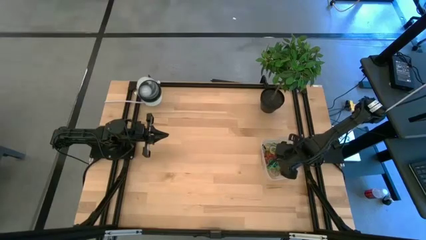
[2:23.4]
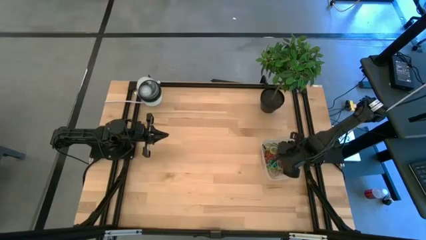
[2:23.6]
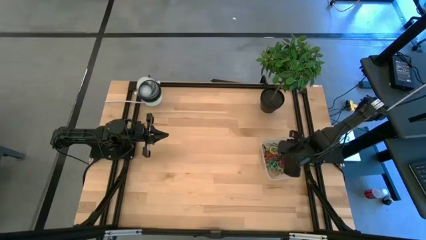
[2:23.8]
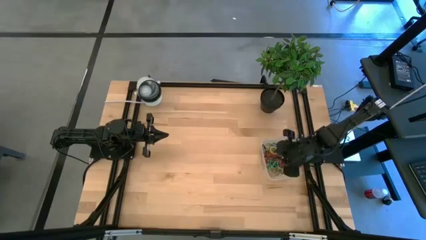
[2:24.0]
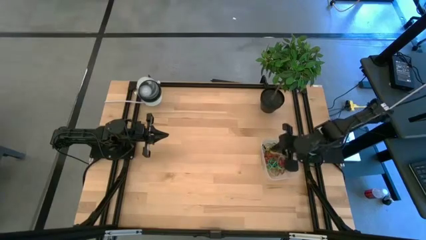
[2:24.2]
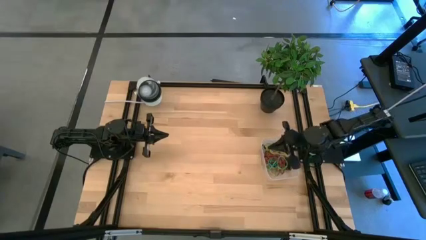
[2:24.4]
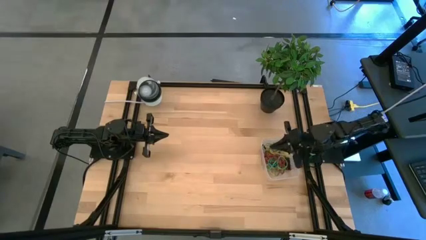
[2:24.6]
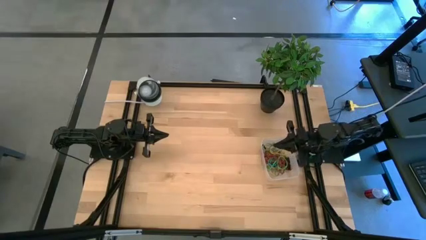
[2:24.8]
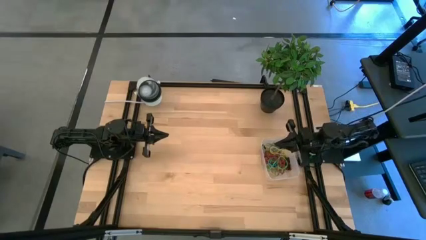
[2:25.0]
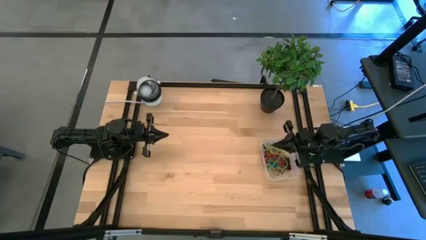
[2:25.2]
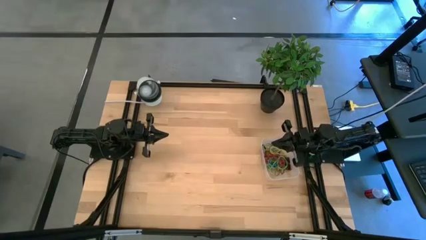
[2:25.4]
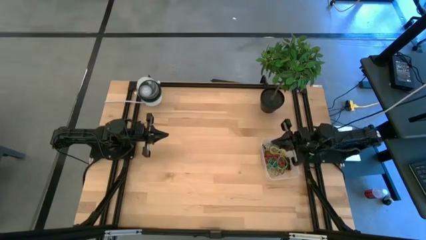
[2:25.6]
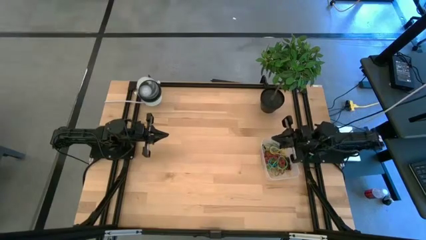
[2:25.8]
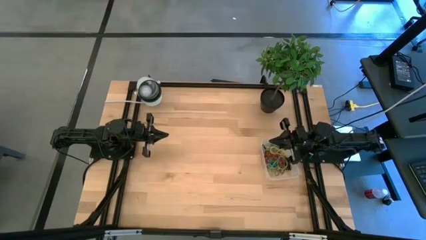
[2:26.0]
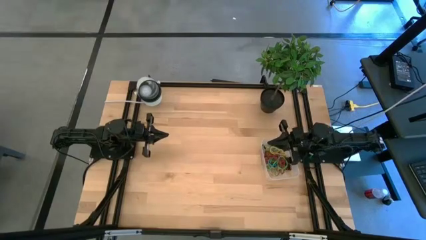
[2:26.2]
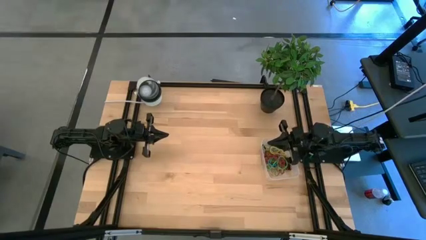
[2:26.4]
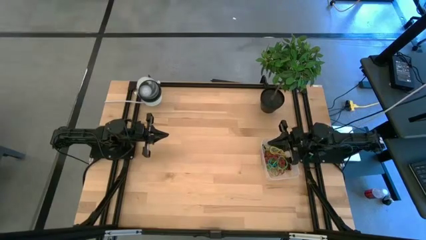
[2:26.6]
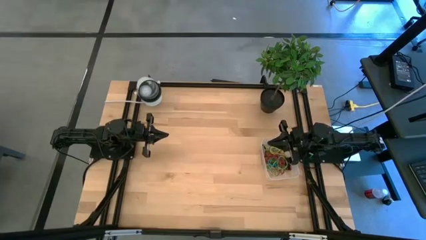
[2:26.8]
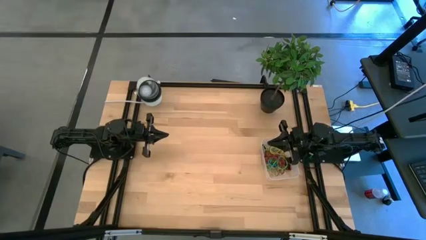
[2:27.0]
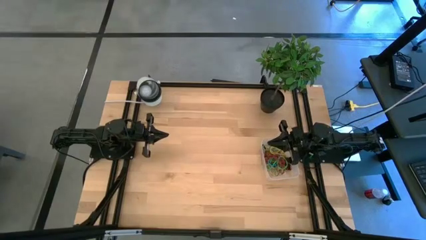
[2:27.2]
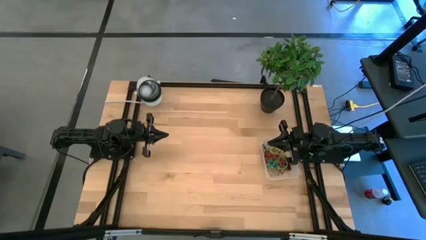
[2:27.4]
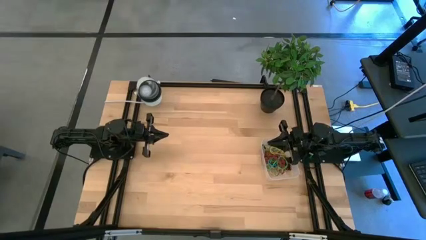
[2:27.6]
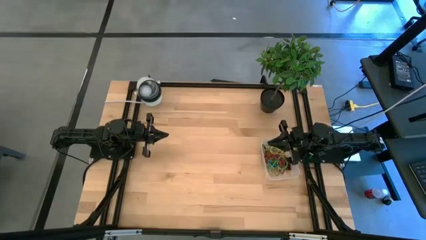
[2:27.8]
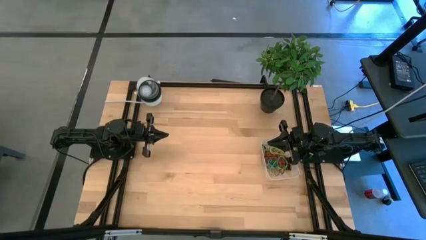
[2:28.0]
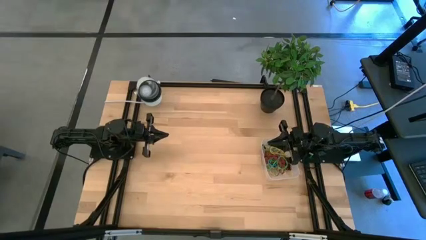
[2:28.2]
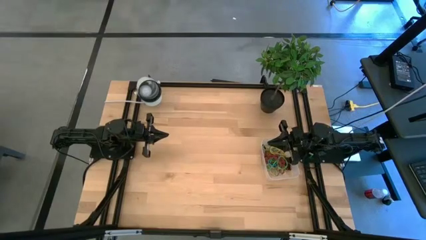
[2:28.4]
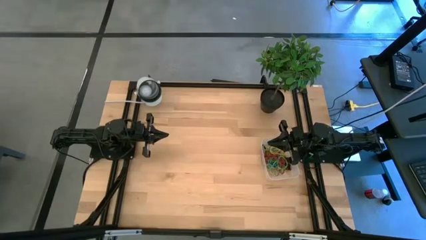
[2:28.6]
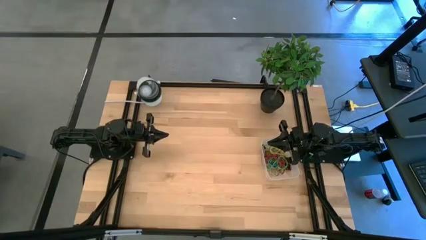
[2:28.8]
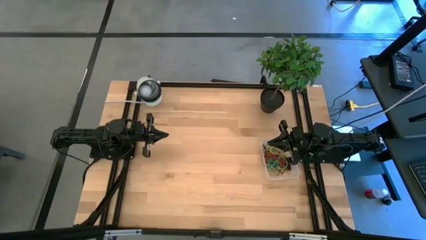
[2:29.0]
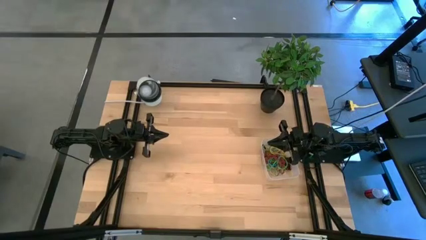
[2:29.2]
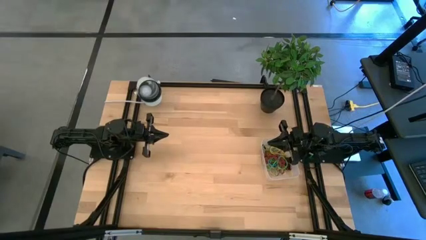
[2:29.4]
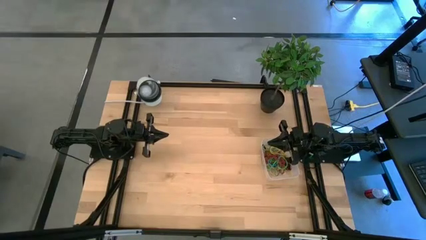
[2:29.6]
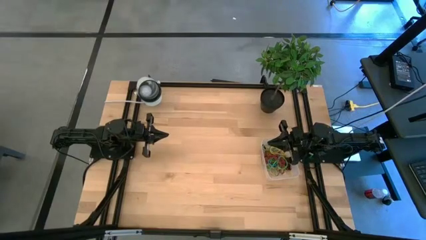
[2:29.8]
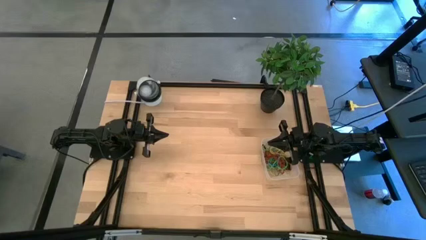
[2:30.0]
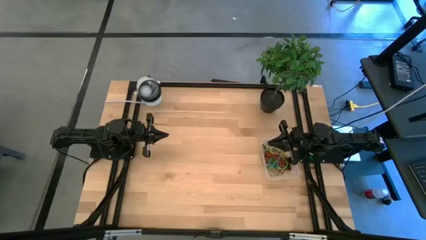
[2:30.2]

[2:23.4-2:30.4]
Task: Pick and place rubber bands into bin
Return to Home Position

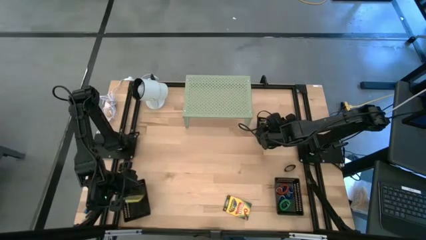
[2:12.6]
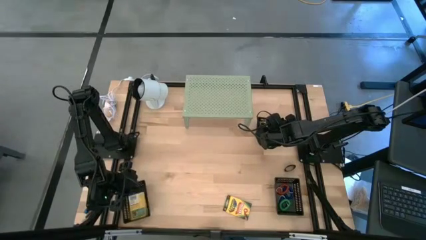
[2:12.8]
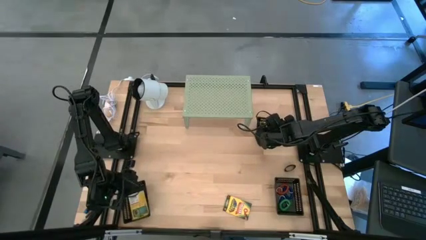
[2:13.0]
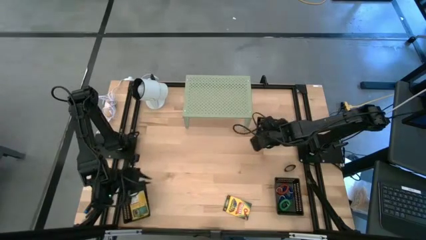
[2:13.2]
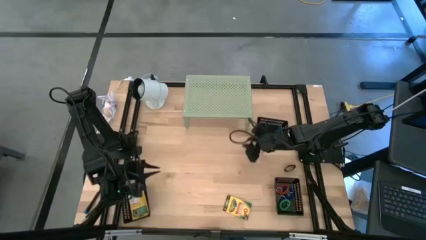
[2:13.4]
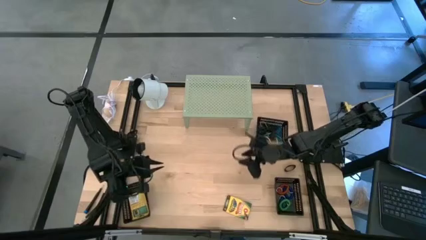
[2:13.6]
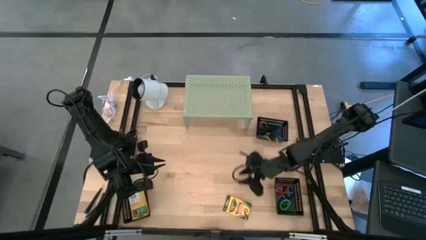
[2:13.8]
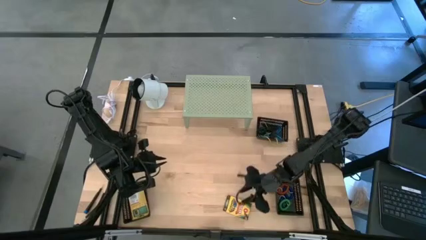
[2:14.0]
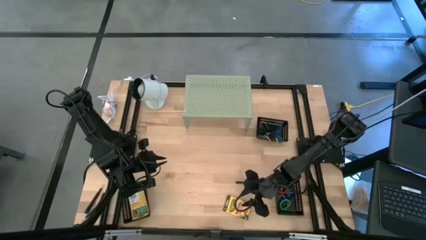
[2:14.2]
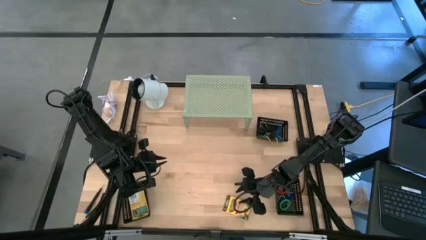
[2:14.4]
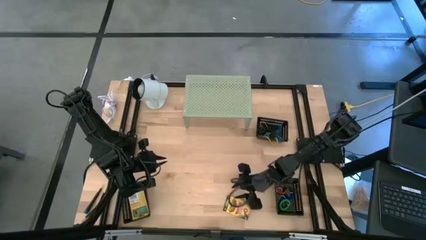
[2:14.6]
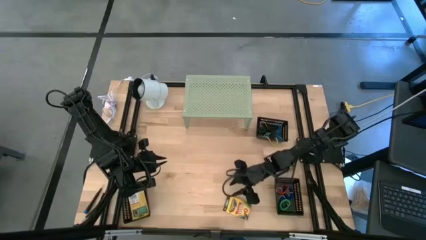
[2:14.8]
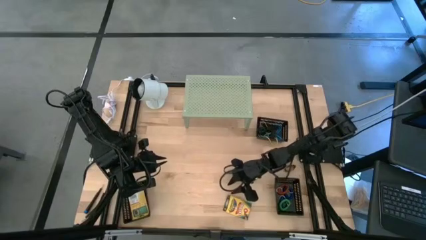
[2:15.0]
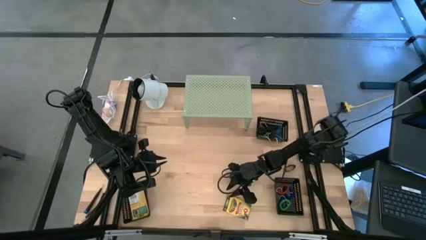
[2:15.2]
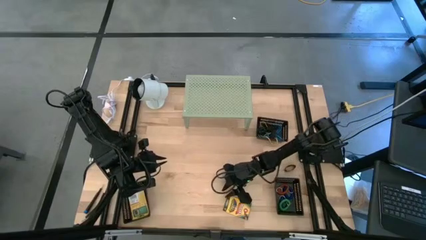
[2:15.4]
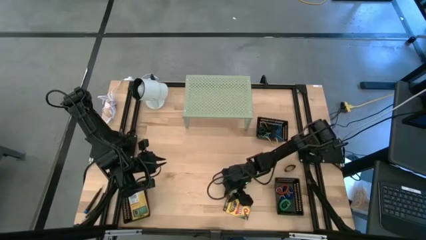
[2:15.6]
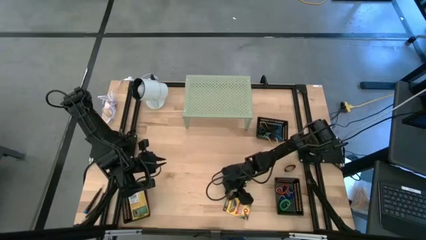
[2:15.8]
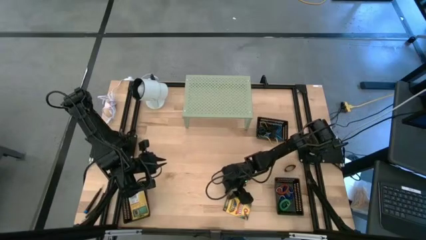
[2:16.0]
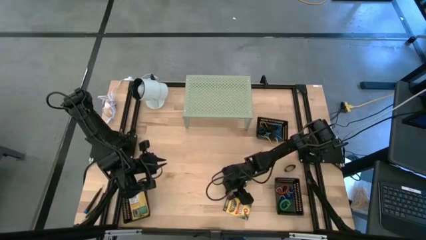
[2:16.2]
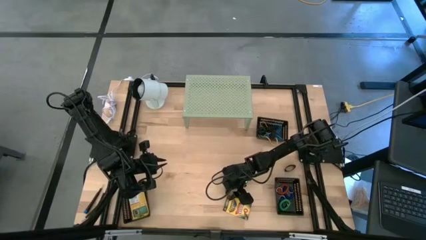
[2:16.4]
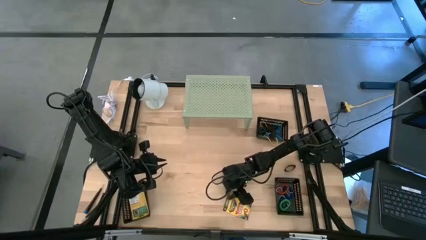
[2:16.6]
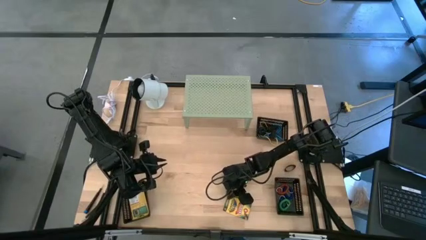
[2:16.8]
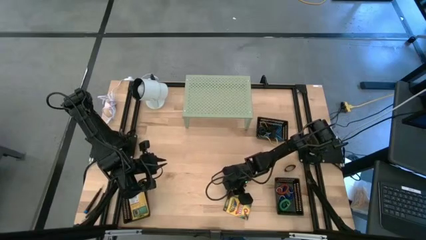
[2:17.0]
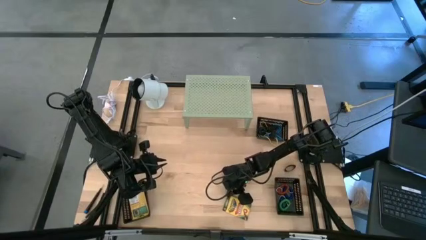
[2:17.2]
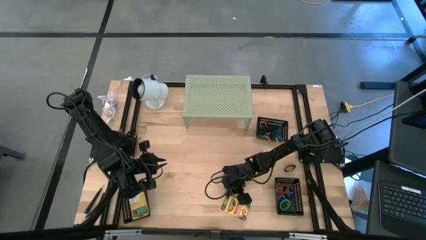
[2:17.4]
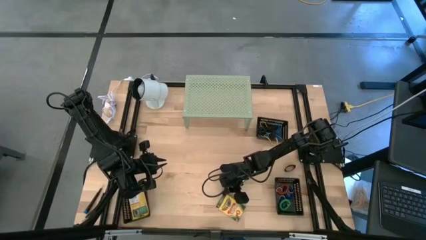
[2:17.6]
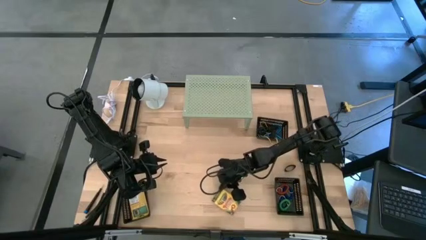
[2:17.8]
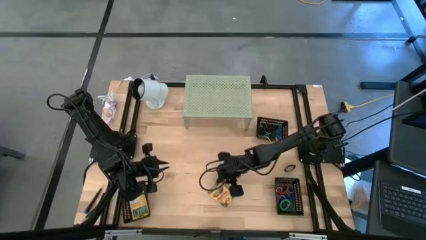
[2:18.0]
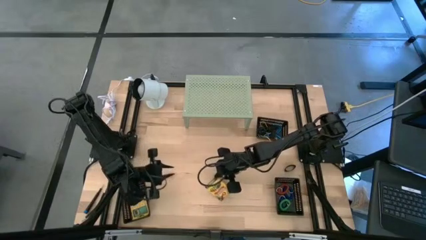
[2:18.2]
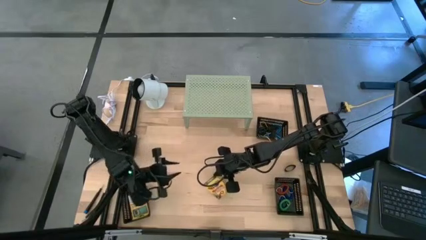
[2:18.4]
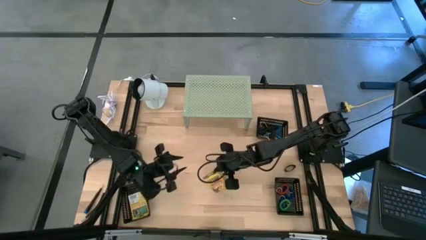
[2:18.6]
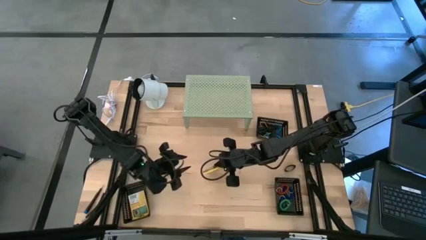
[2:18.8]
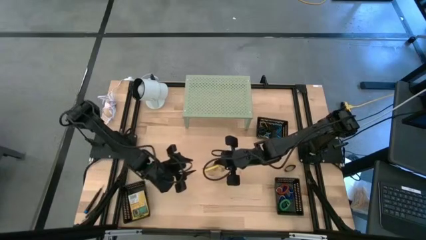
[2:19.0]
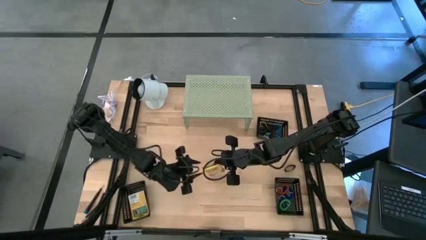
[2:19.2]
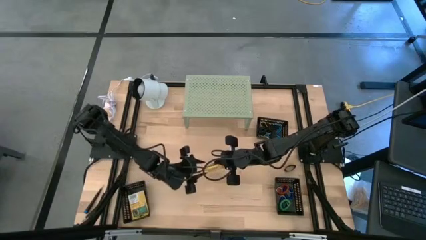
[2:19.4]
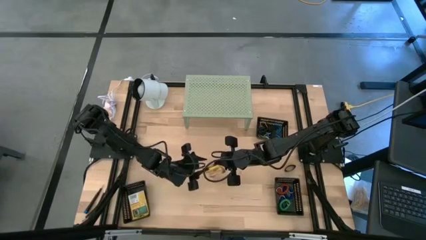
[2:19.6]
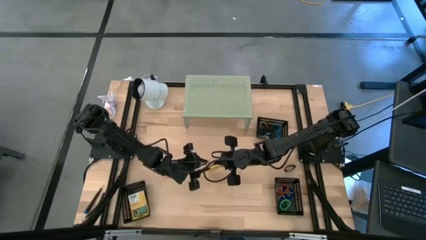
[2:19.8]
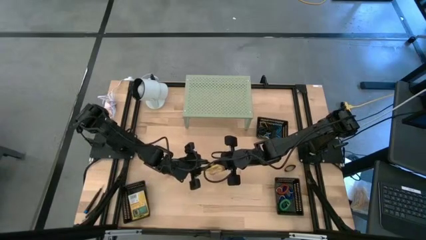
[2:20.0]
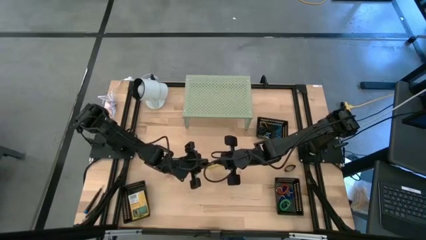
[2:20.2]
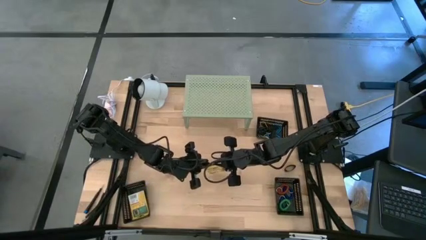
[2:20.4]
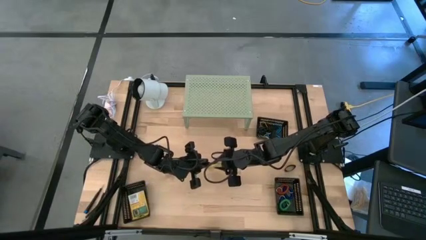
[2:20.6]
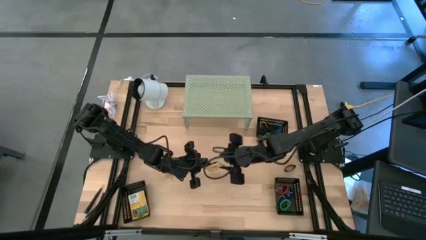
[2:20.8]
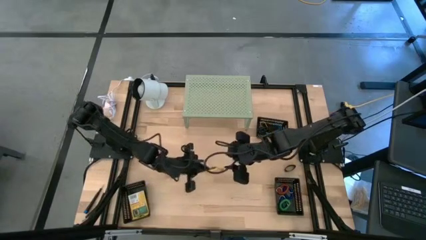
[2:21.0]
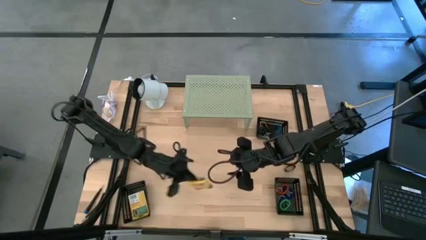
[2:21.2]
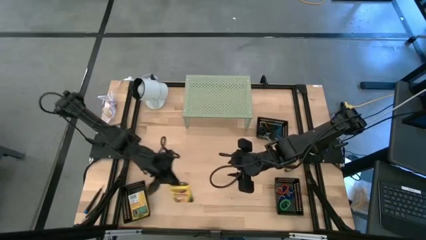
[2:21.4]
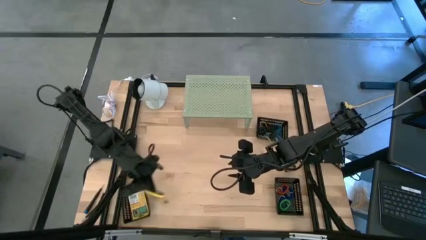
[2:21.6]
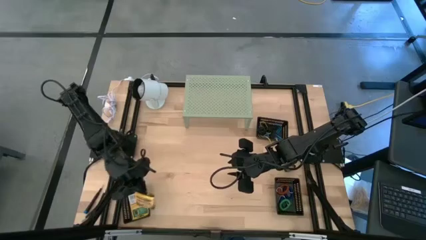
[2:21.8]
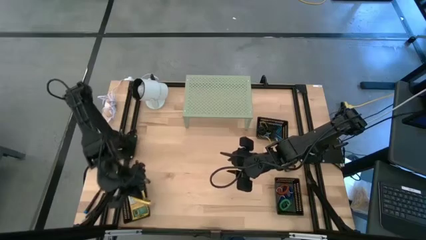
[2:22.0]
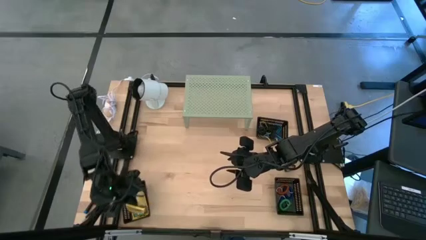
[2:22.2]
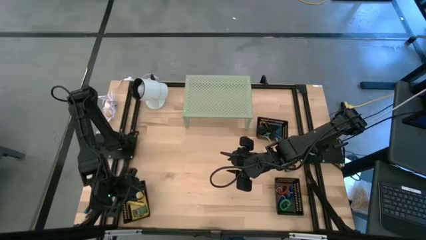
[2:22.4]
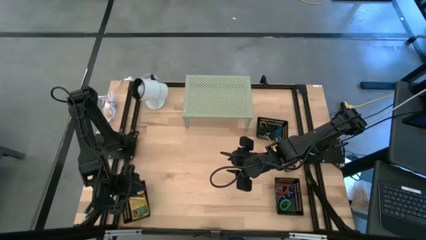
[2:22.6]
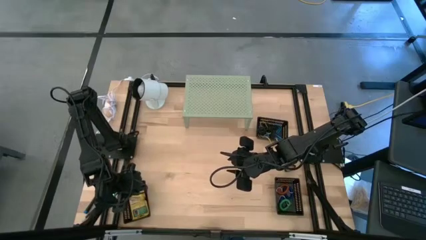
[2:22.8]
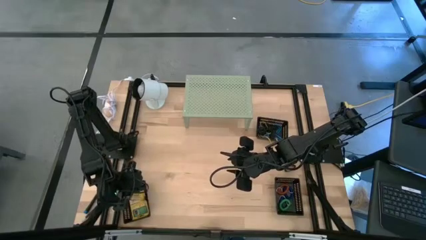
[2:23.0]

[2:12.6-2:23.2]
Task: Pick & Place Office Desk Supplies
Put the crayon box into the bottom left black bin
